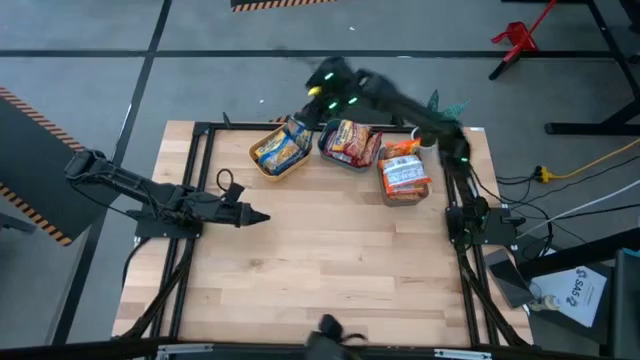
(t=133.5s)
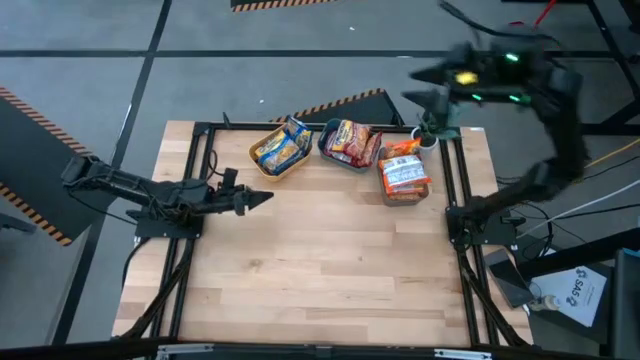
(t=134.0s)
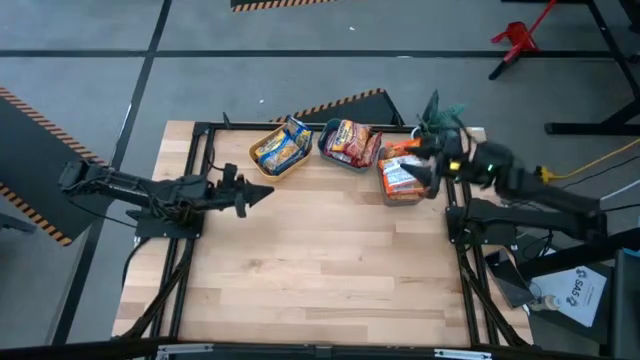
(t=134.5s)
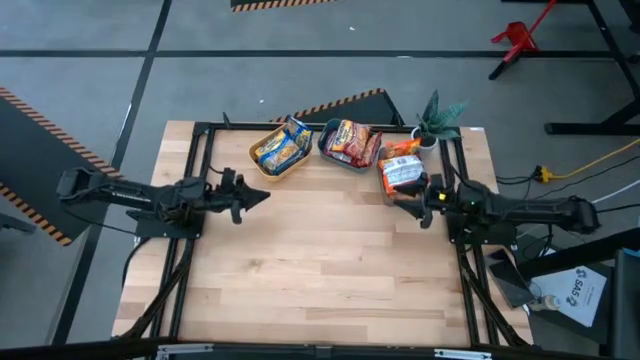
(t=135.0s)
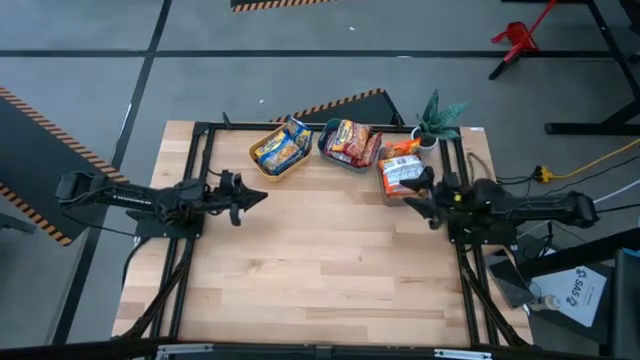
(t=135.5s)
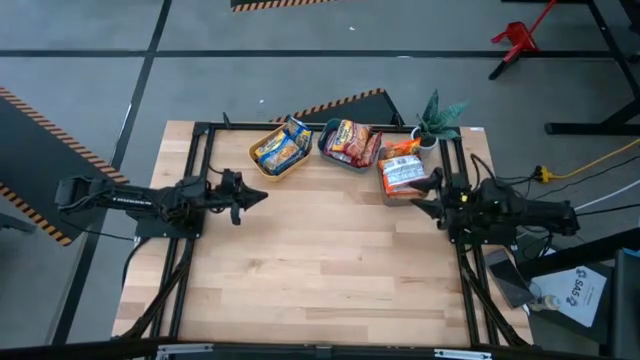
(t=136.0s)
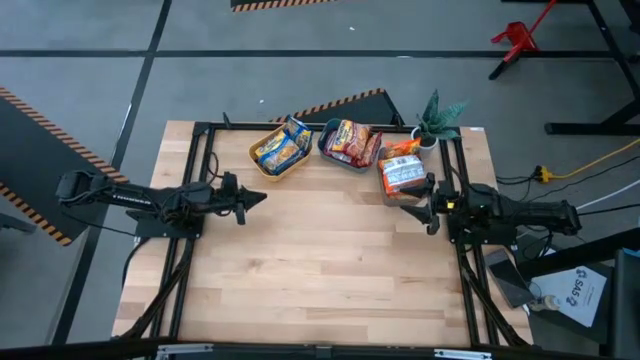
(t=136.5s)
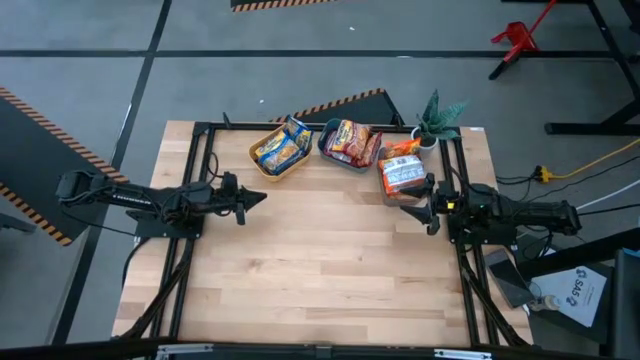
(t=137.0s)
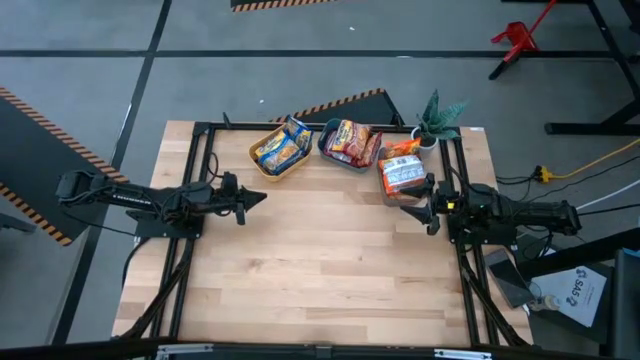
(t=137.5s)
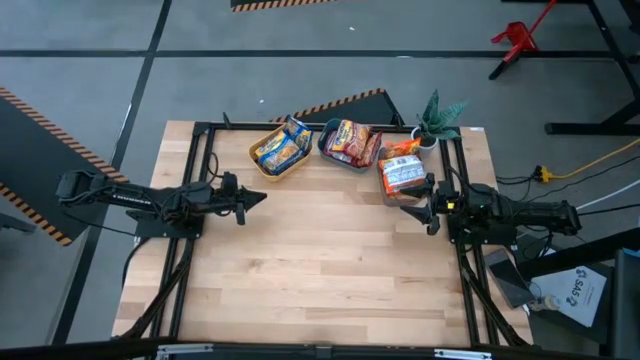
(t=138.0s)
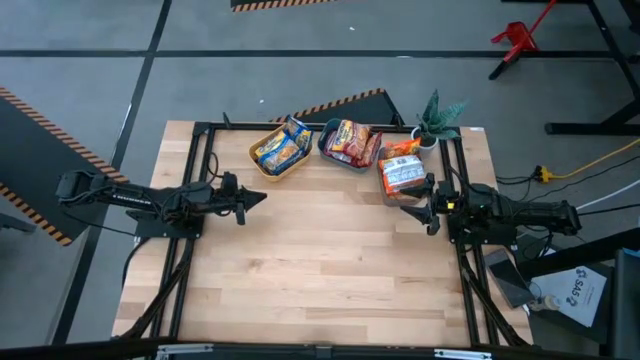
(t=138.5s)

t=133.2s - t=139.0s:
Task: Sort Maruchan noodles
Return to Home Position

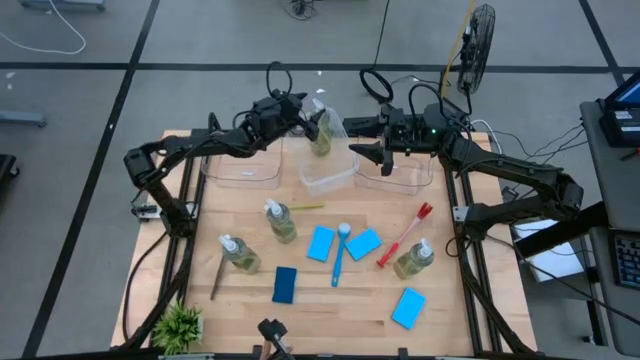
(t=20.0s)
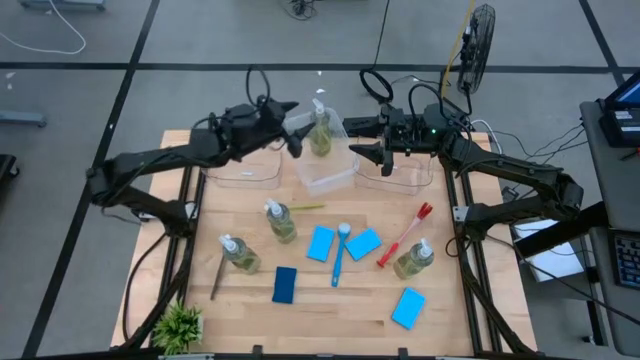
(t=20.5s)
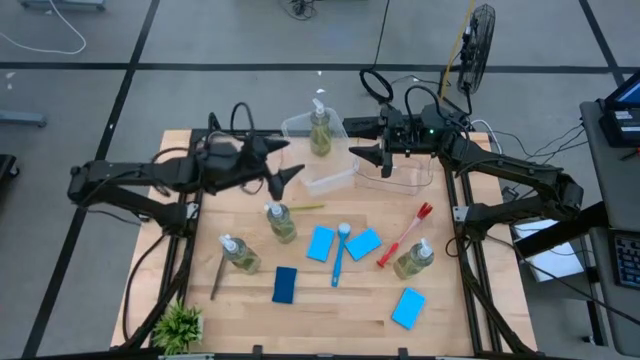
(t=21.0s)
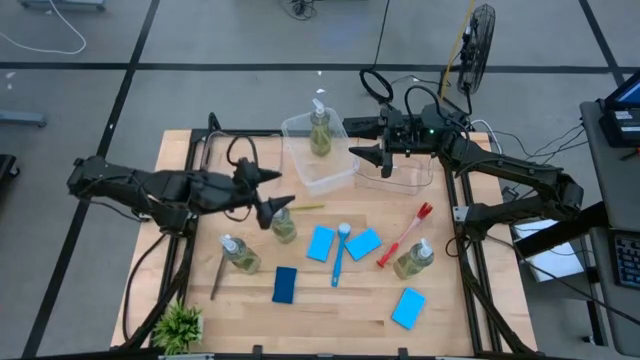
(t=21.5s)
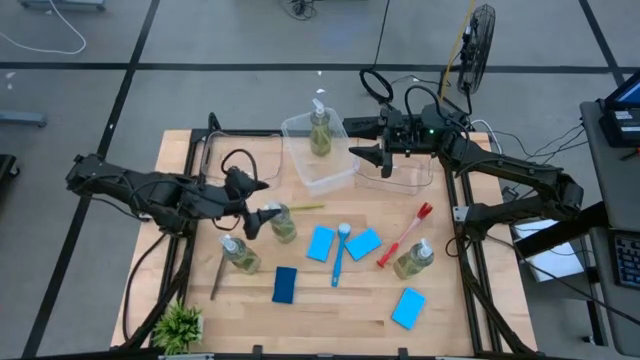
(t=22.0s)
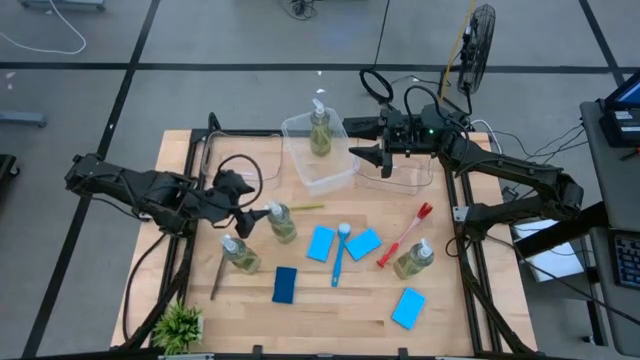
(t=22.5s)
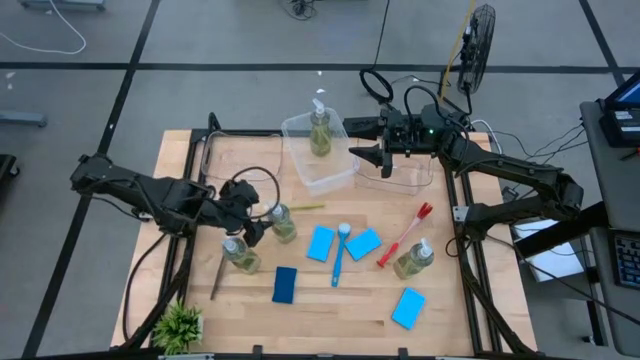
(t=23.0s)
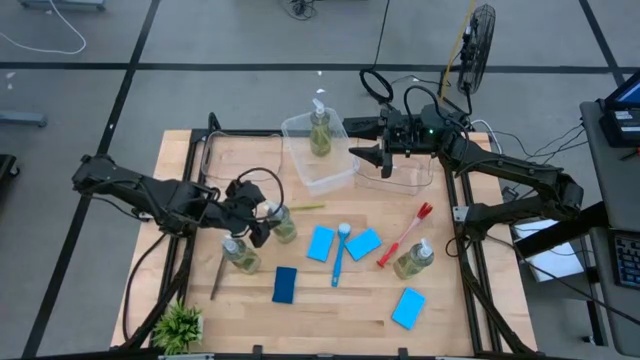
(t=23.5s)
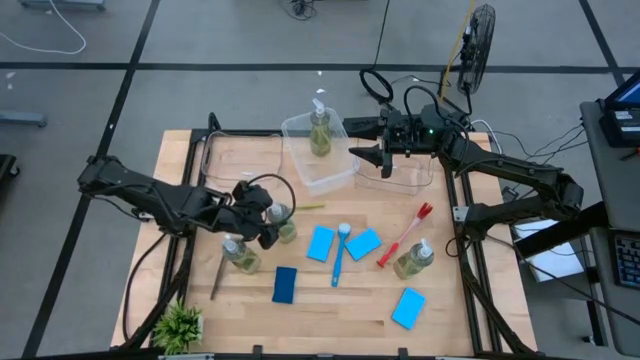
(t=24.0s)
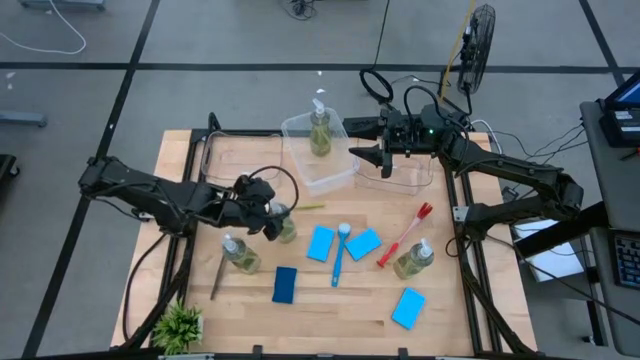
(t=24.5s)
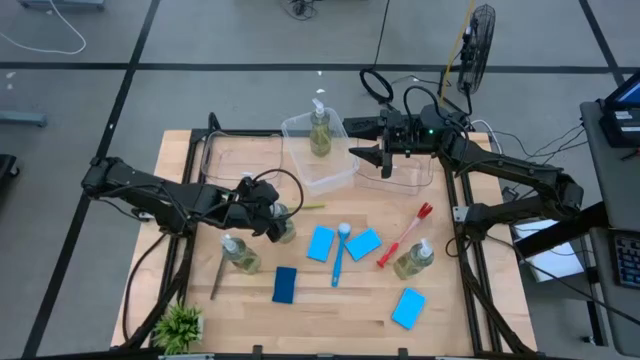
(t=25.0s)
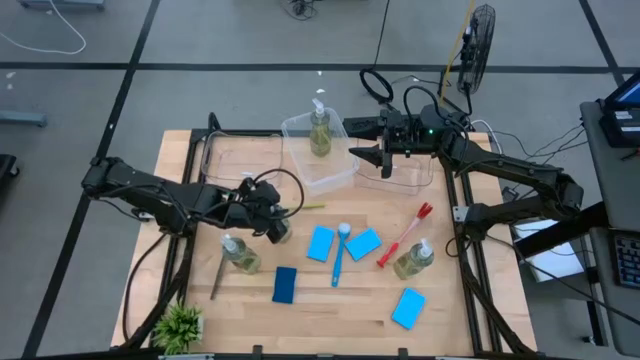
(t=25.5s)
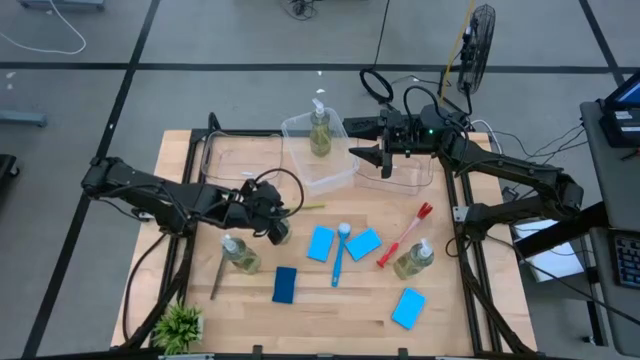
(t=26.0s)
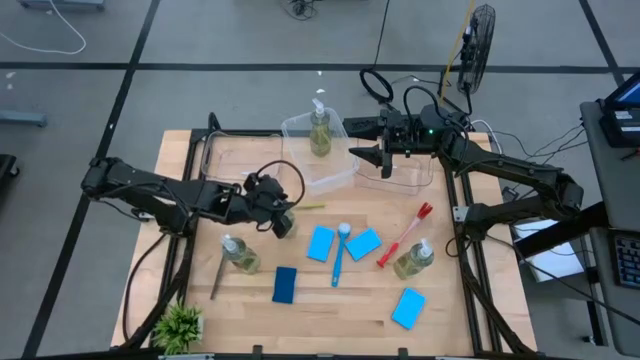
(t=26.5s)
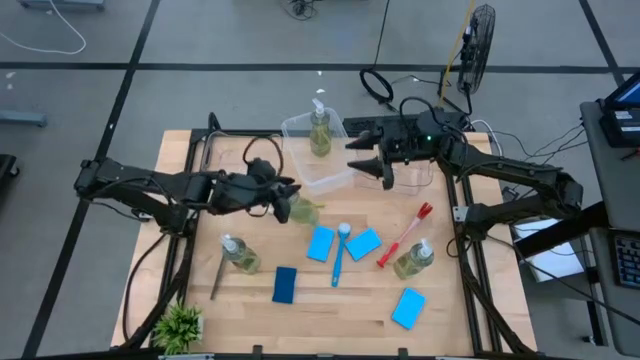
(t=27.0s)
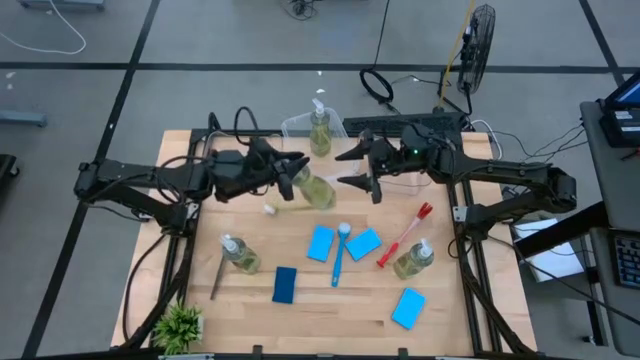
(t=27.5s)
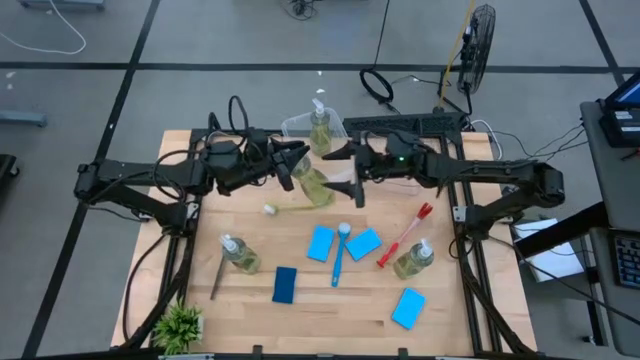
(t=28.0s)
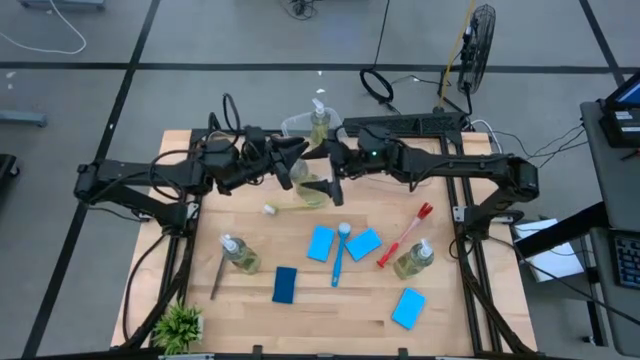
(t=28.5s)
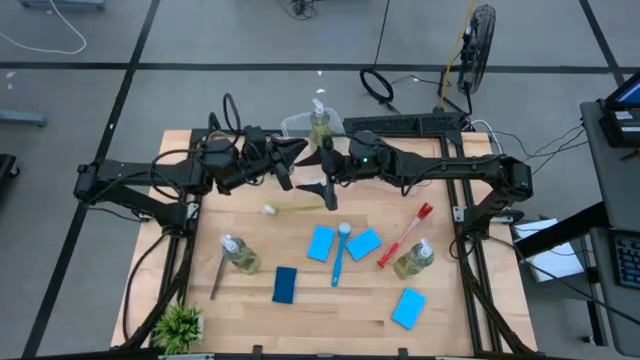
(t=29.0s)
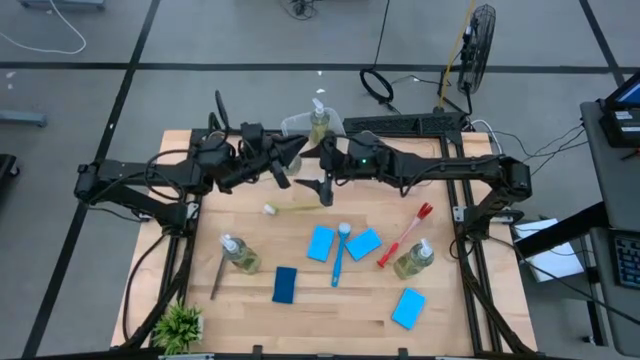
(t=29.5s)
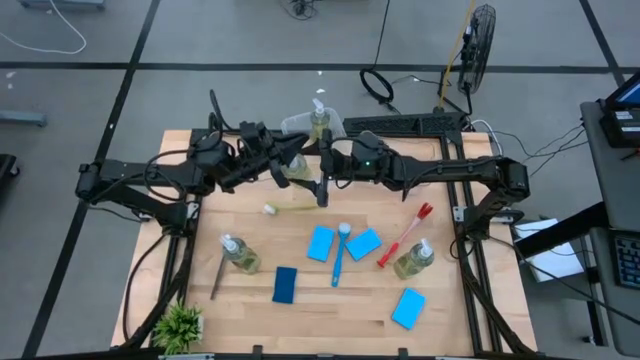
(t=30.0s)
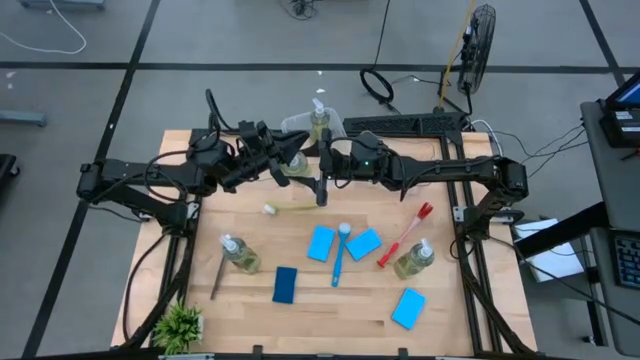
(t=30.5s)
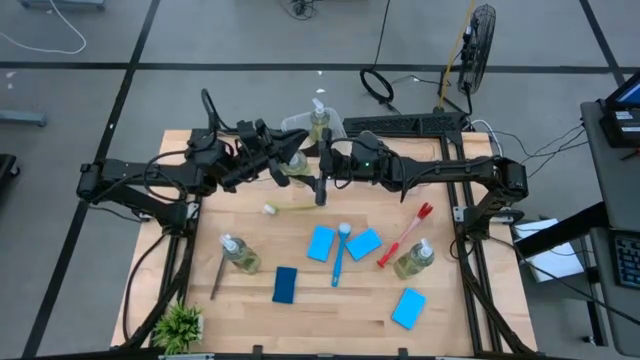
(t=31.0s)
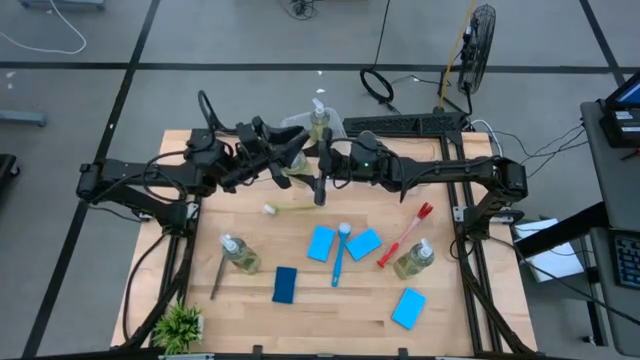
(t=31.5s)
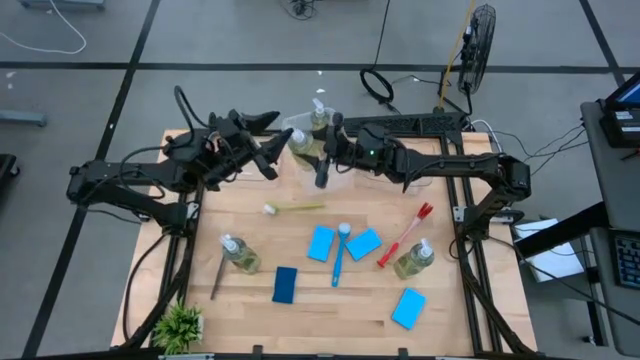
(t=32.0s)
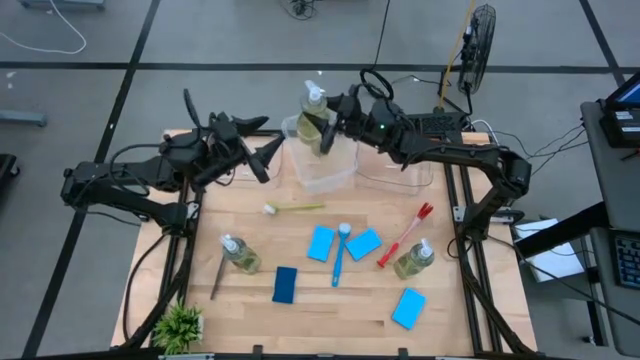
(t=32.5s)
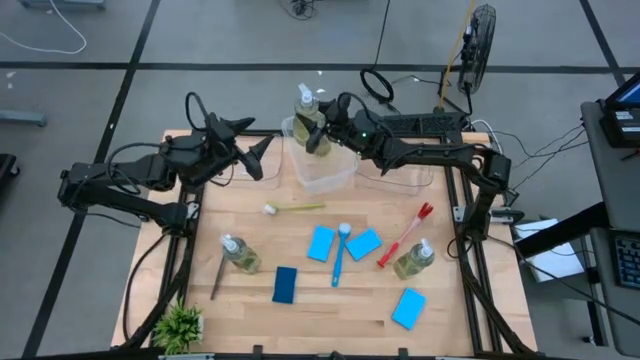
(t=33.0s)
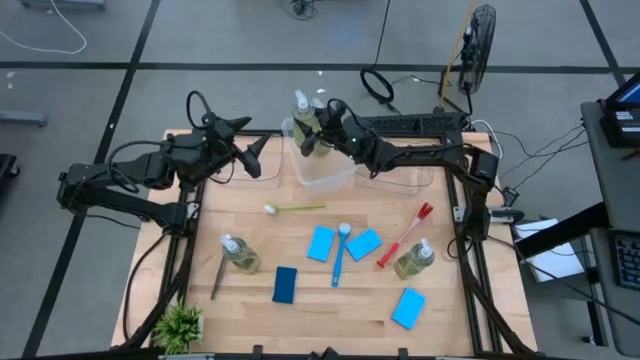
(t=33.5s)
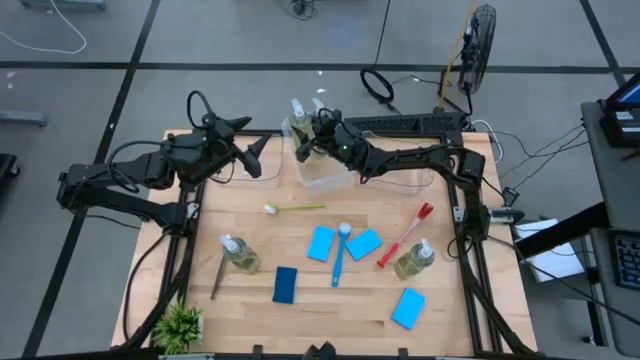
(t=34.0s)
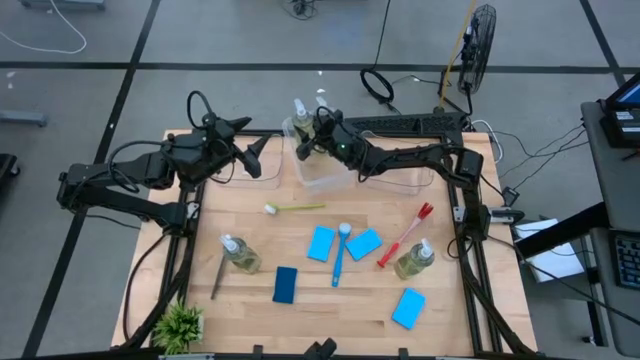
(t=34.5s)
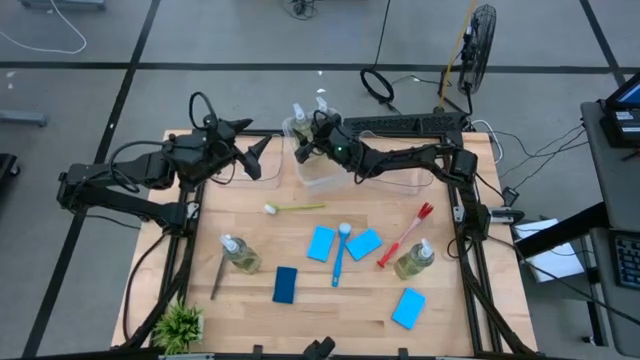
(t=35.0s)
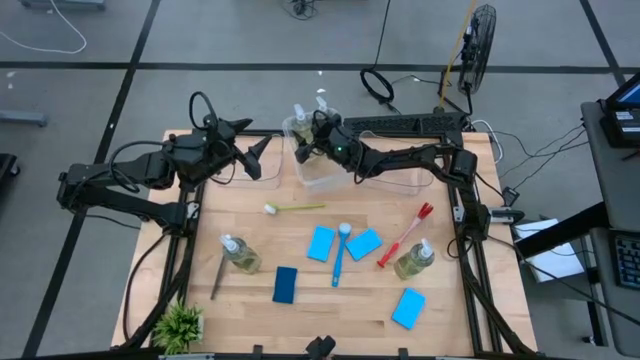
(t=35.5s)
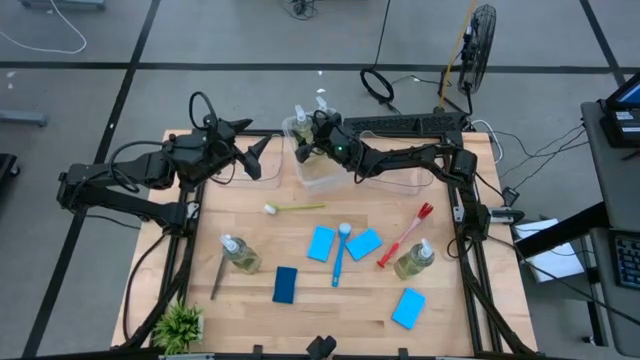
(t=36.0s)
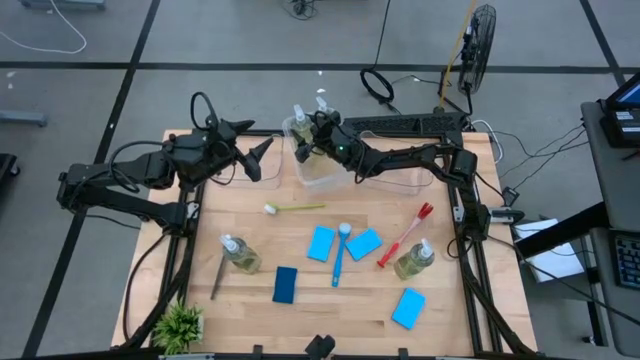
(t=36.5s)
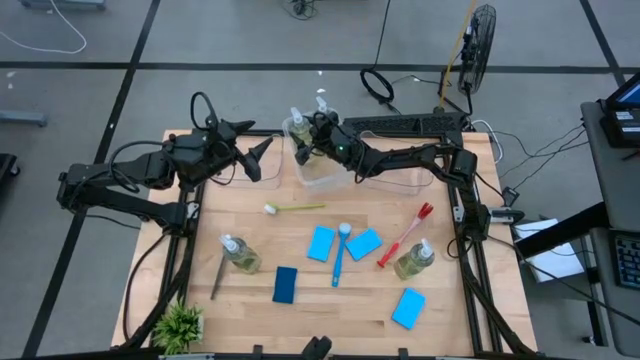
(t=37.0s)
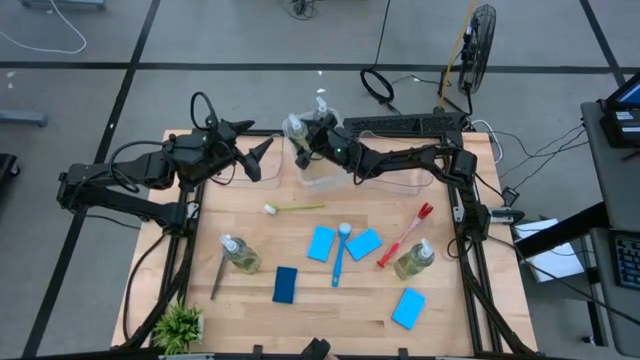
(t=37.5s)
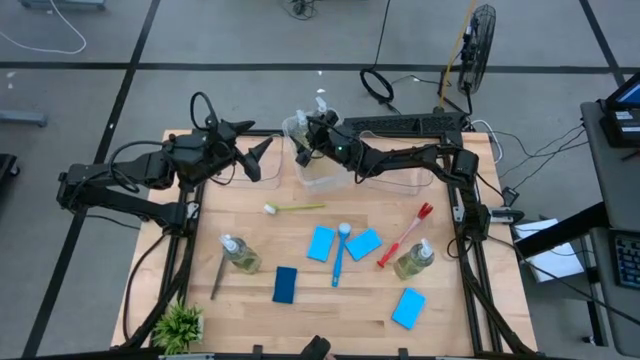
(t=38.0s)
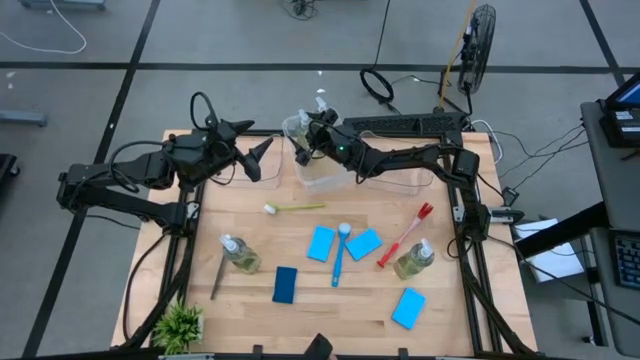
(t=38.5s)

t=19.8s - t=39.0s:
Task: Pick & Place Kitchen Sink Supplies
Put the yellow dish soap into the white bin
